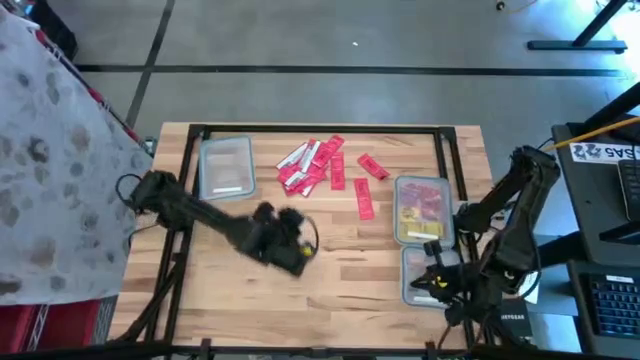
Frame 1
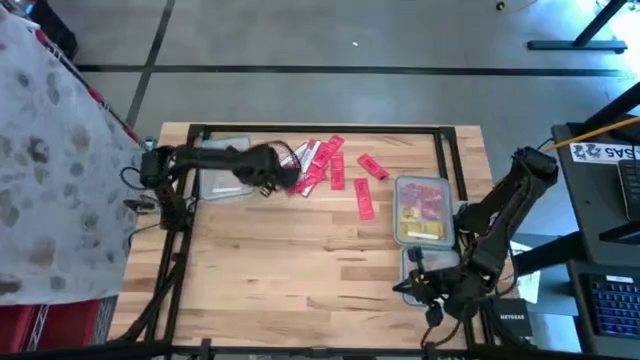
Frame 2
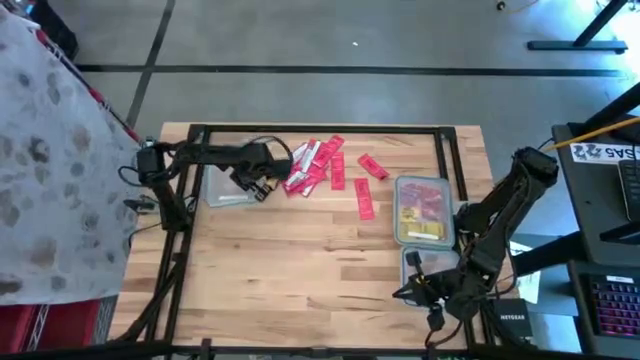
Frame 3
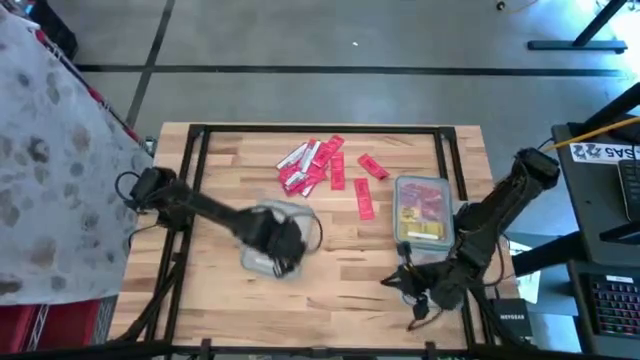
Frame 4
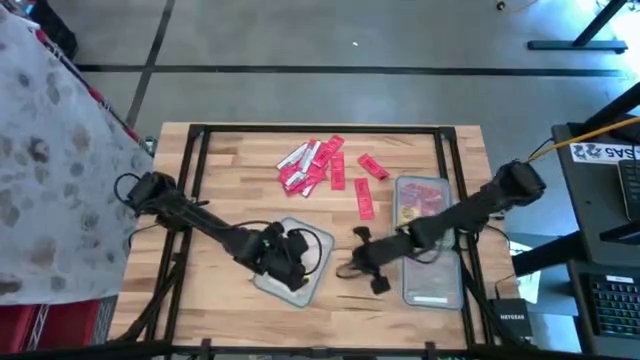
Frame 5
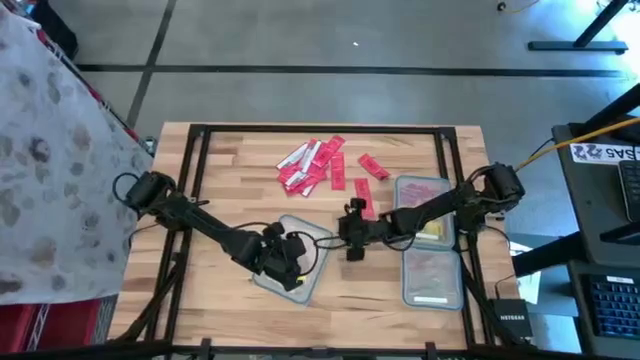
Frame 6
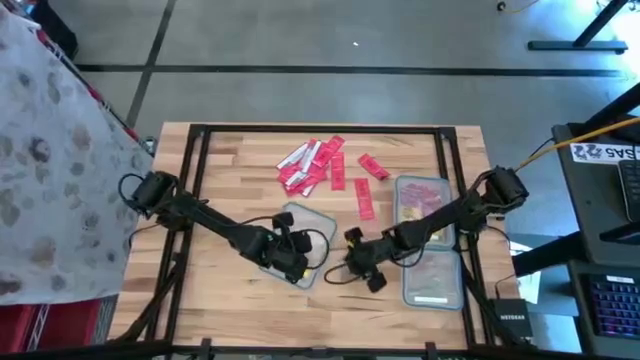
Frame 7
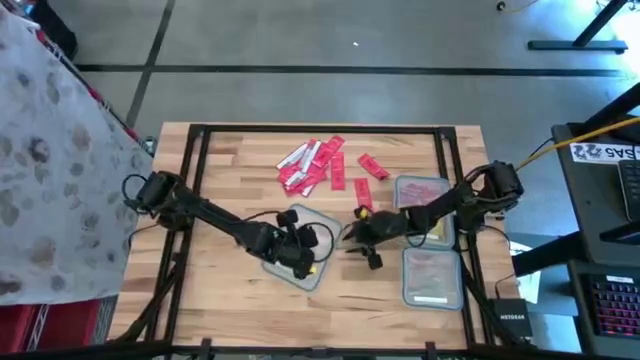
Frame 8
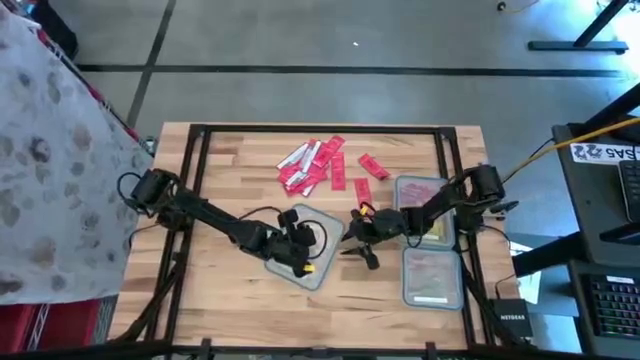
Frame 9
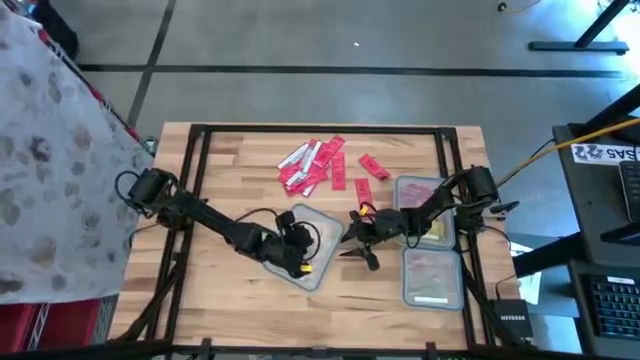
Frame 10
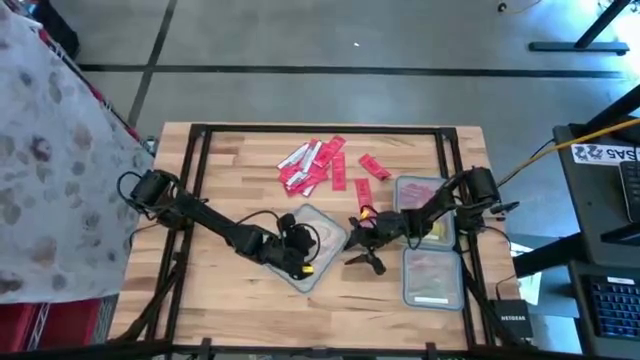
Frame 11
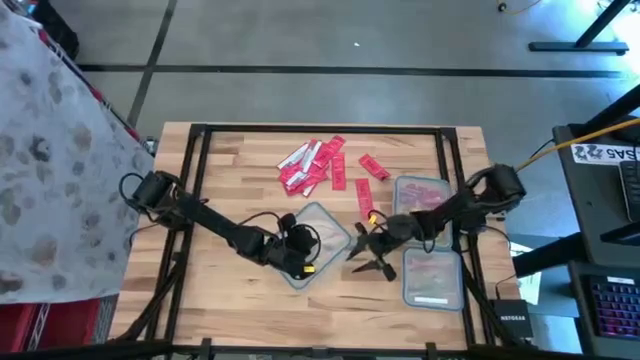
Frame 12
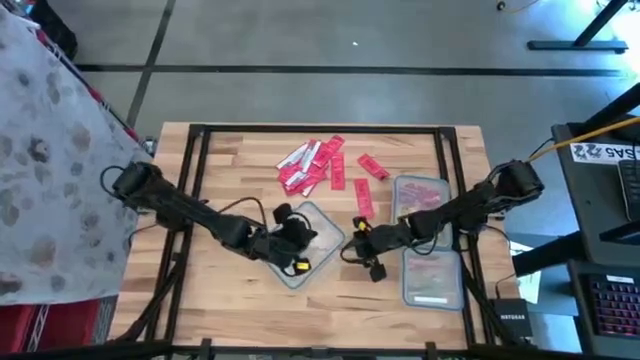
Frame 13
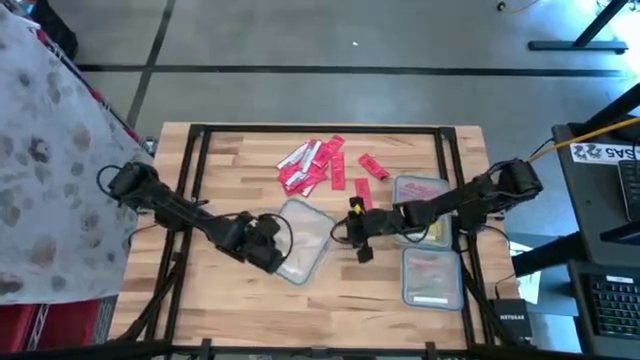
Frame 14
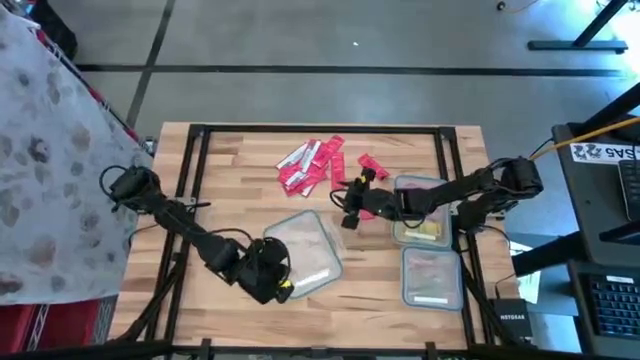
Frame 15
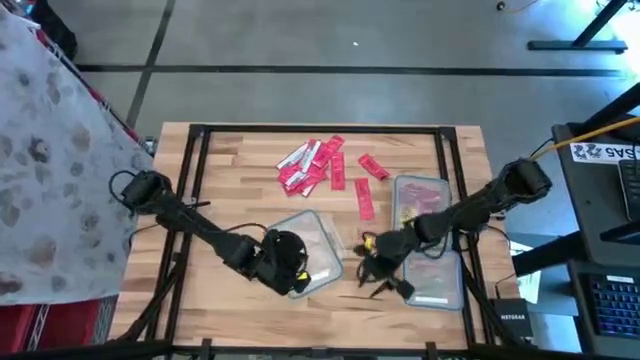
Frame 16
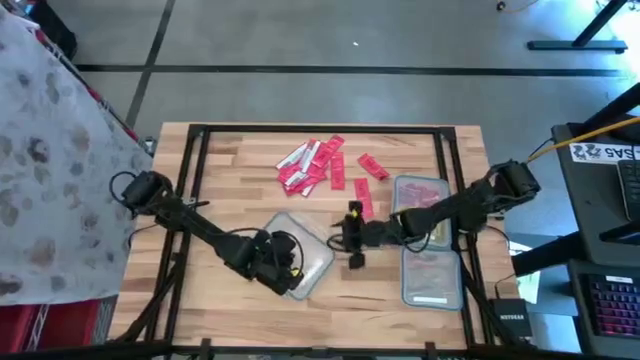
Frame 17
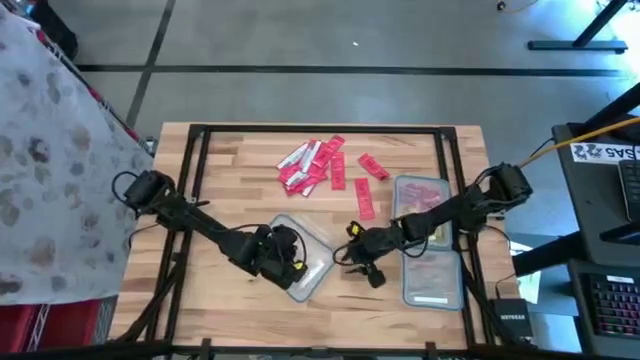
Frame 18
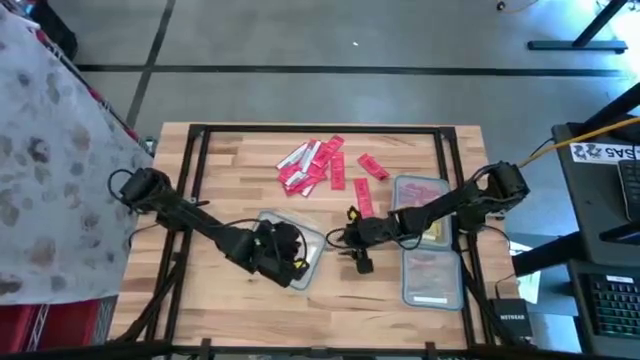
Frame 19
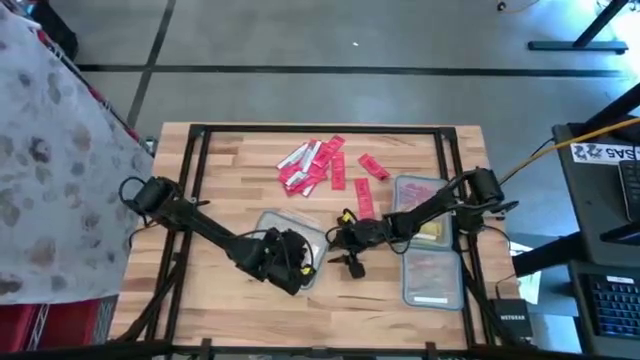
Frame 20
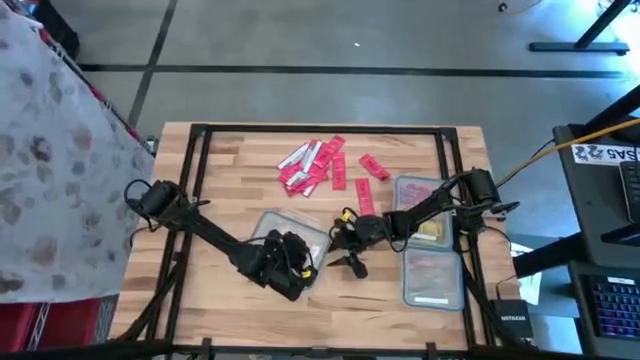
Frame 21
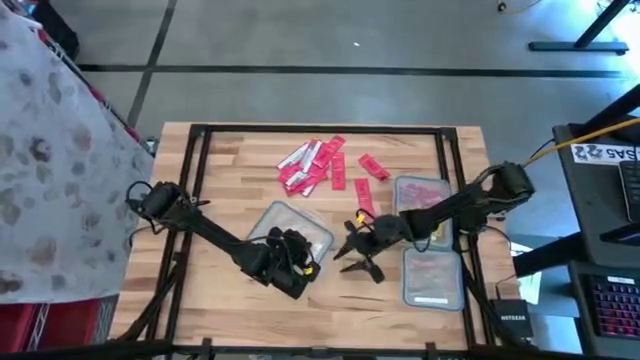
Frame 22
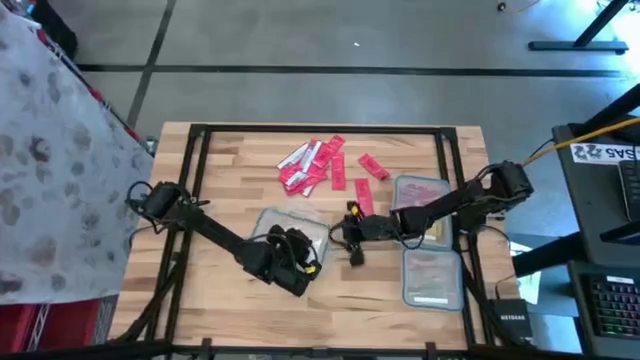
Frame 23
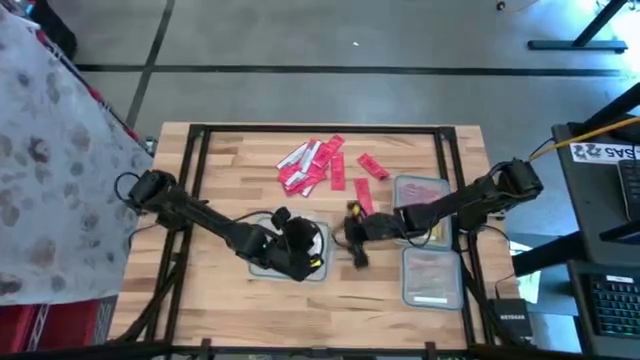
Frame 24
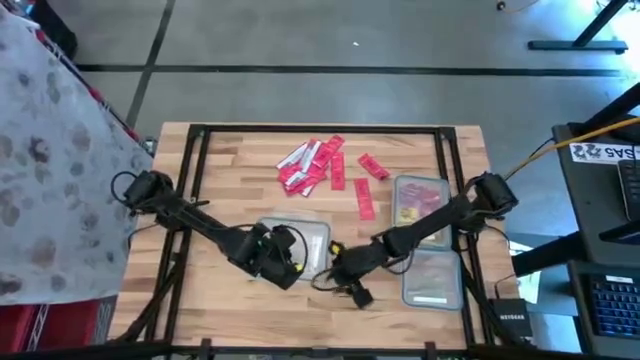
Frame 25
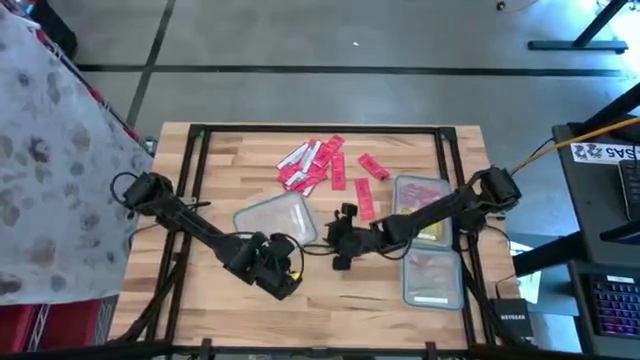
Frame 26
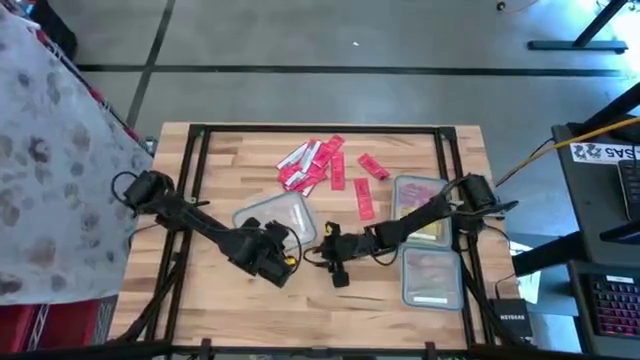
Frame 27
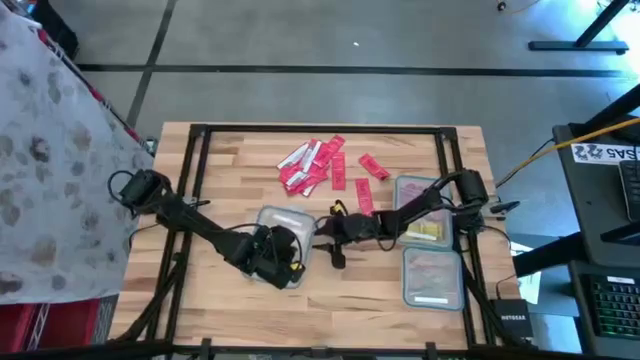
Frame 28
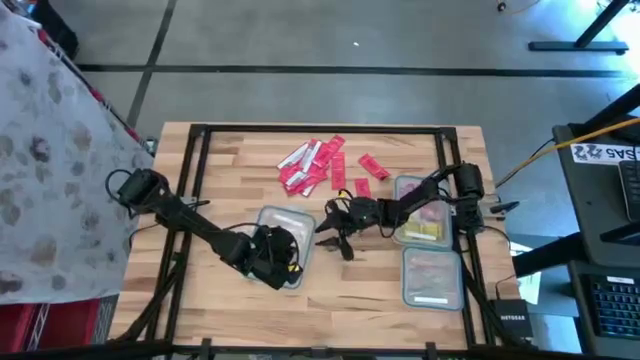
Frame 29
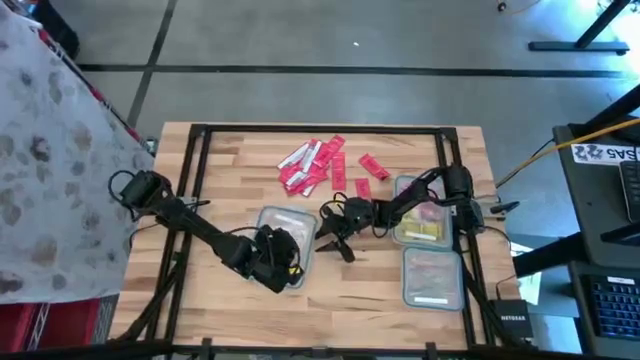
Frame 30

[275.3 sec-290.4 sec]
Task: Sort candy
Open the left transparent bin

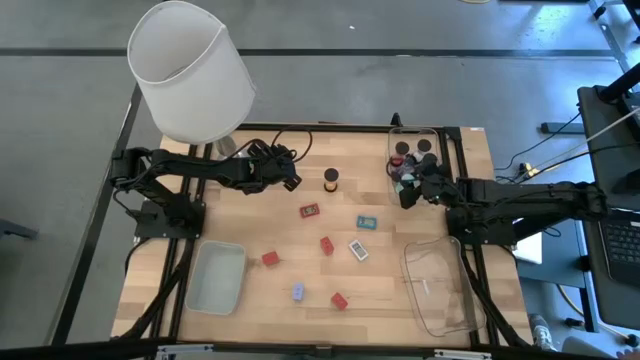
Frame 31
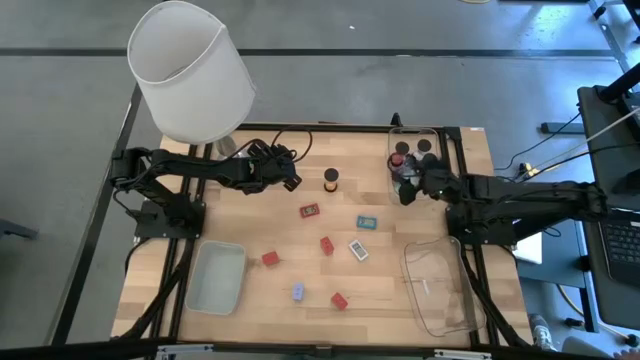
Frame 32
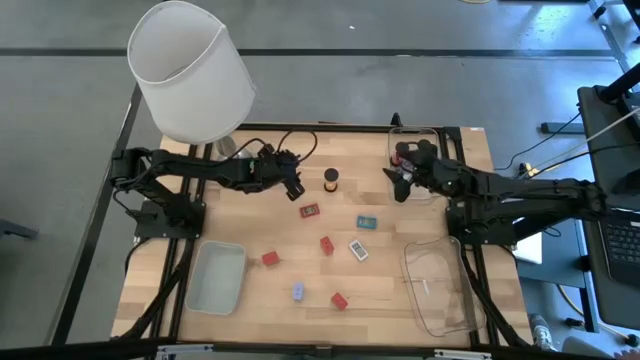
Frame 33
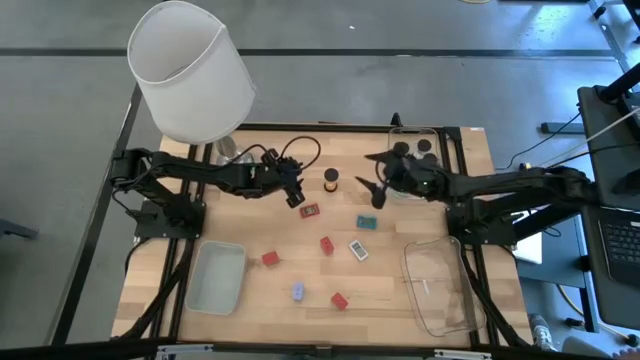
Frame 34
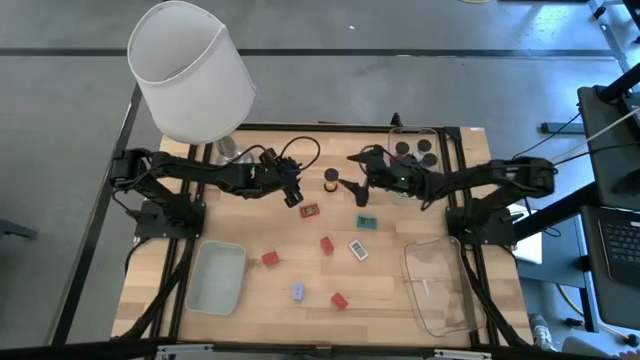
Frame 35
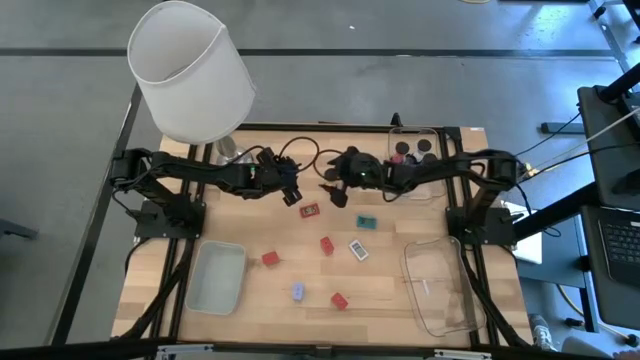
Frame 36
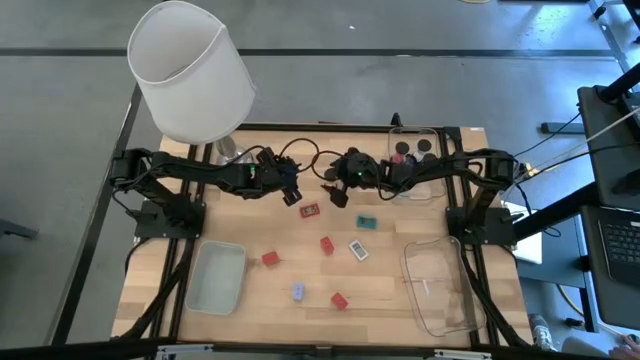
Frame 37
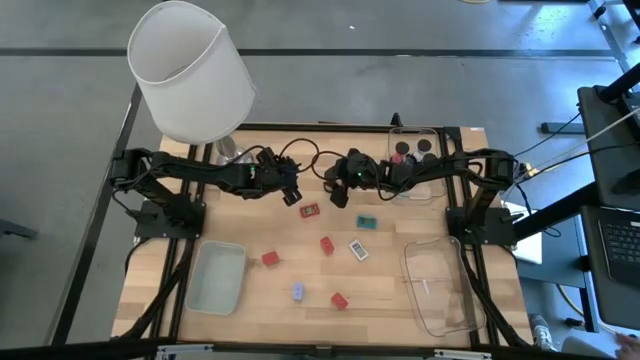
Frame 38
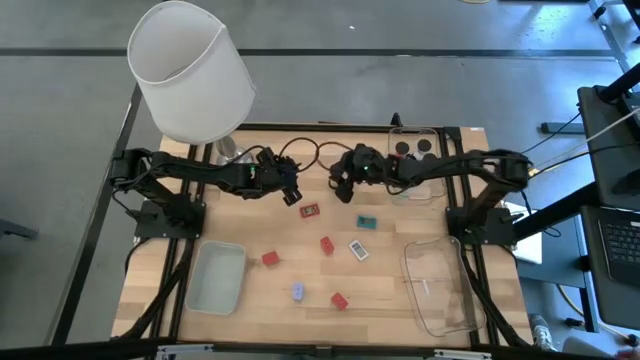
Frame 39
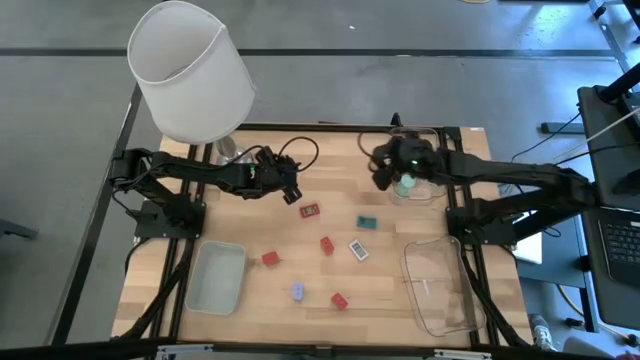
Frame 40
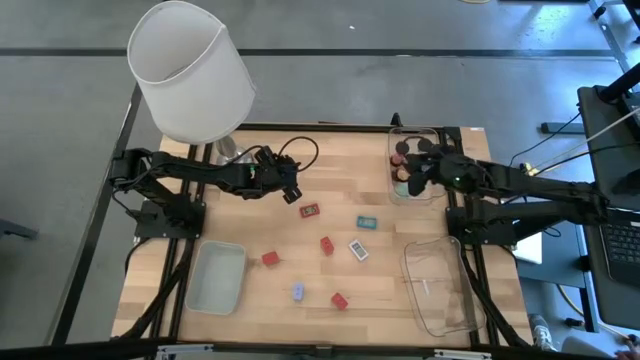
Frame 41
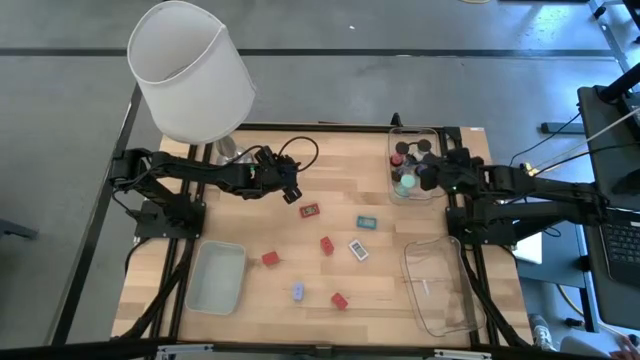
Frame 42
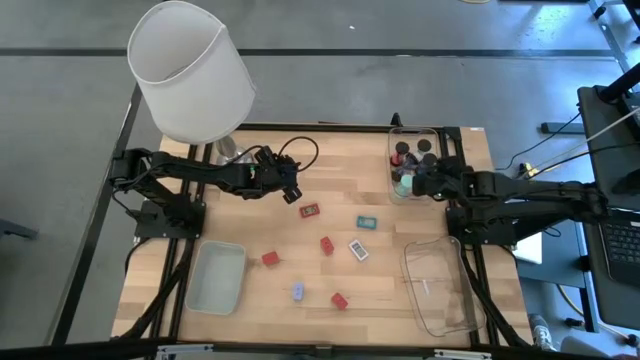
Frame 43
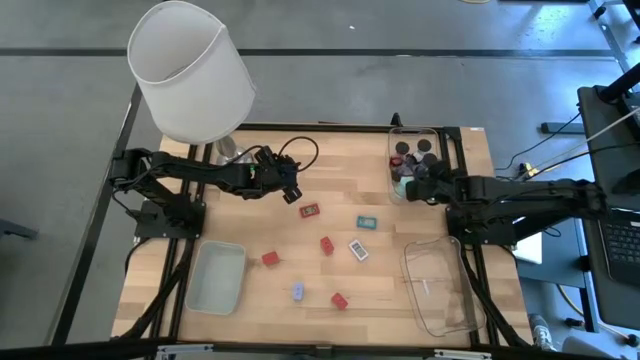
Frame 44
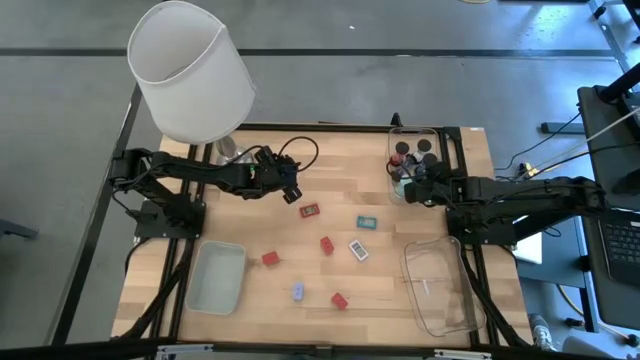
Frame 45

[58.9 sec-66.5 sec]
Task: Pick & Place Office items
Put the orange sand timer into the top transparent bin
